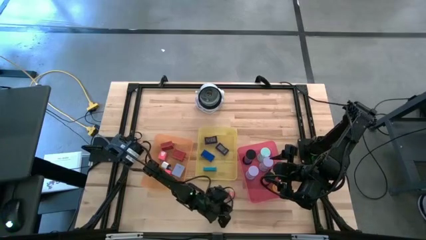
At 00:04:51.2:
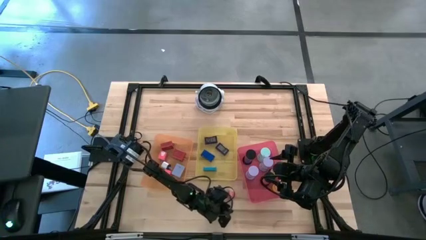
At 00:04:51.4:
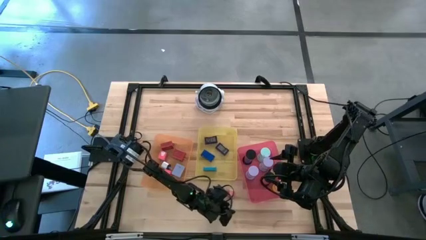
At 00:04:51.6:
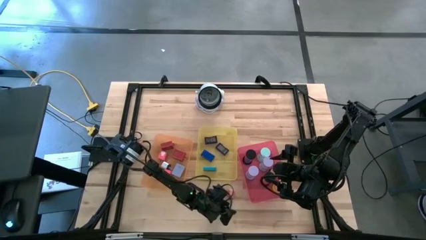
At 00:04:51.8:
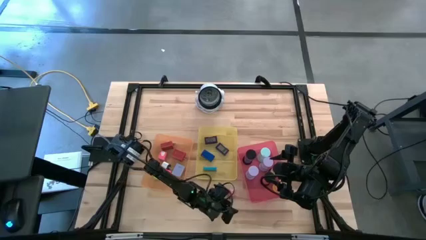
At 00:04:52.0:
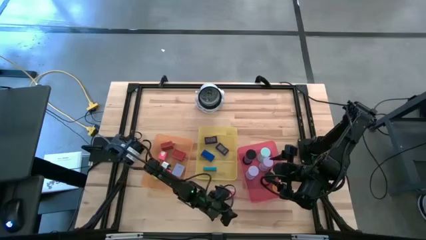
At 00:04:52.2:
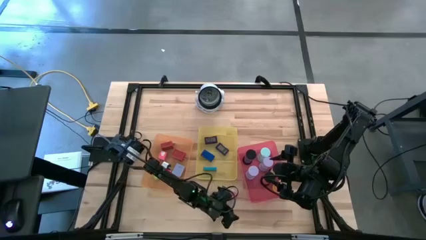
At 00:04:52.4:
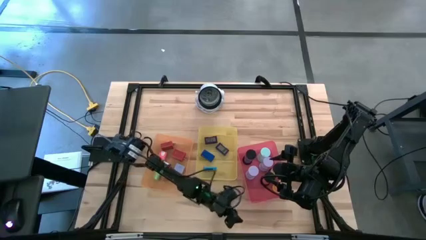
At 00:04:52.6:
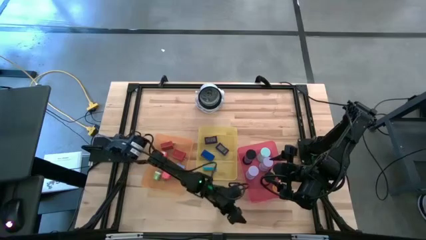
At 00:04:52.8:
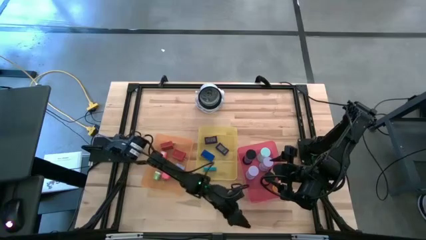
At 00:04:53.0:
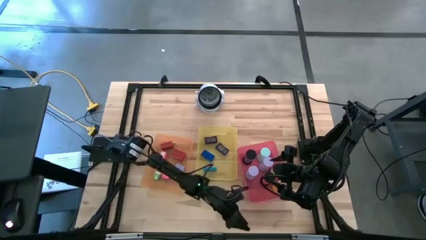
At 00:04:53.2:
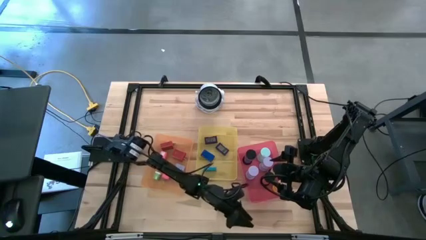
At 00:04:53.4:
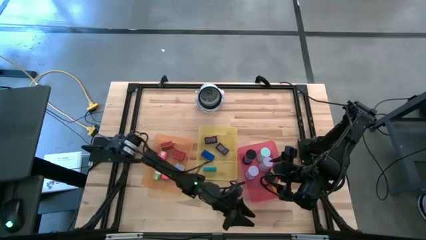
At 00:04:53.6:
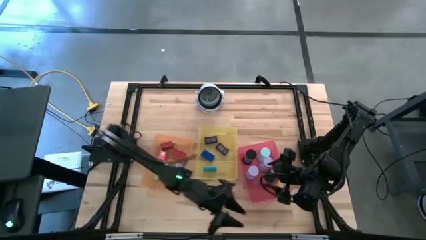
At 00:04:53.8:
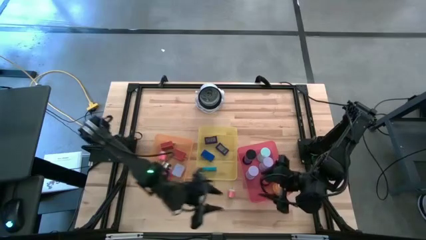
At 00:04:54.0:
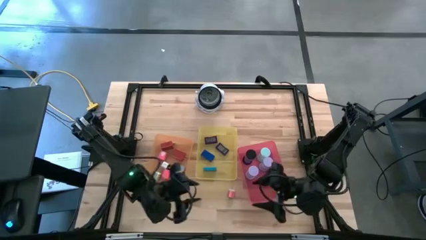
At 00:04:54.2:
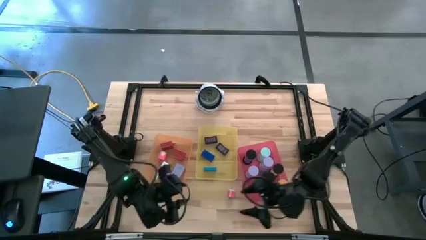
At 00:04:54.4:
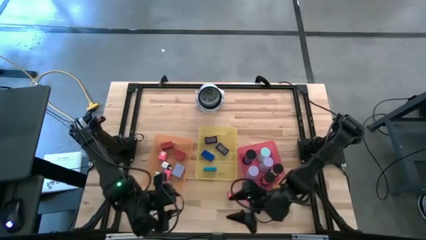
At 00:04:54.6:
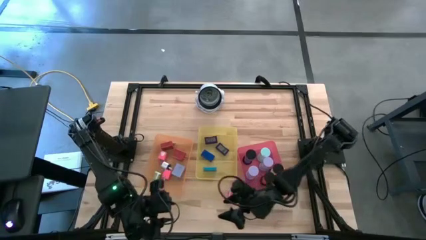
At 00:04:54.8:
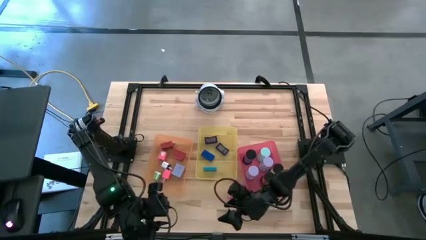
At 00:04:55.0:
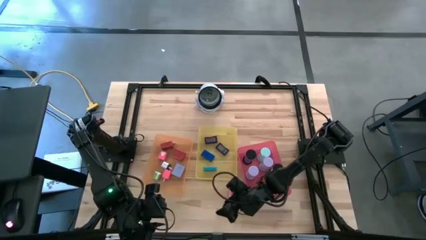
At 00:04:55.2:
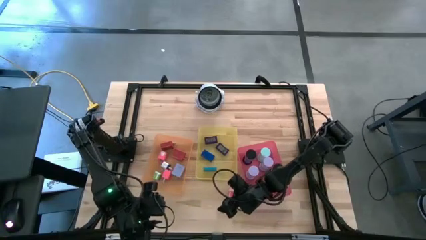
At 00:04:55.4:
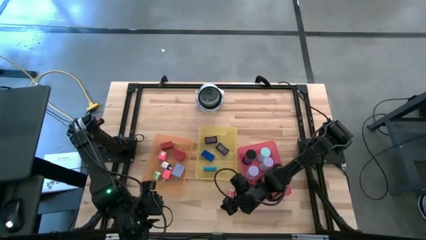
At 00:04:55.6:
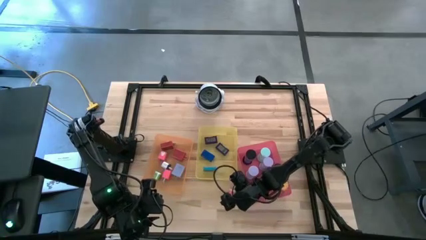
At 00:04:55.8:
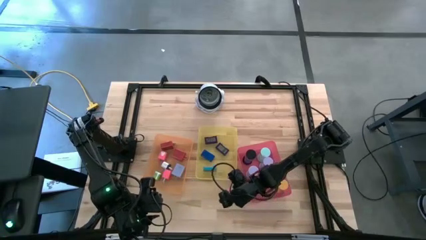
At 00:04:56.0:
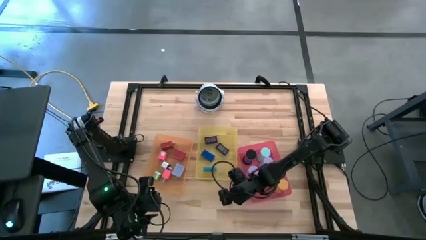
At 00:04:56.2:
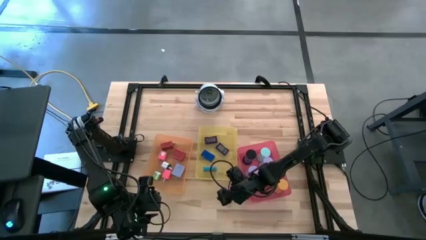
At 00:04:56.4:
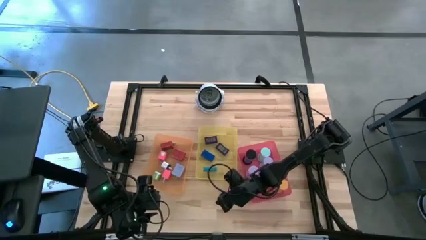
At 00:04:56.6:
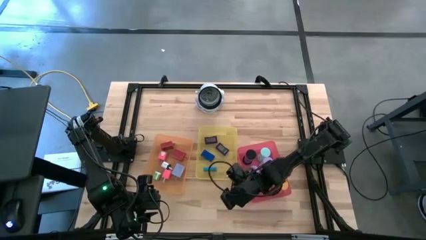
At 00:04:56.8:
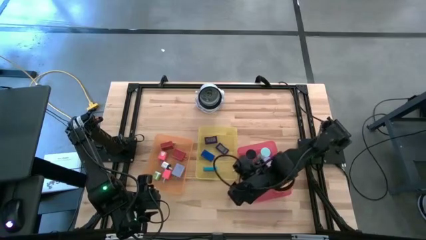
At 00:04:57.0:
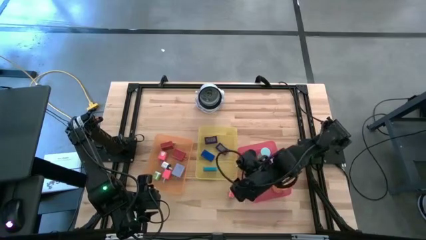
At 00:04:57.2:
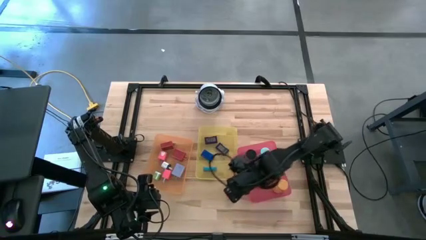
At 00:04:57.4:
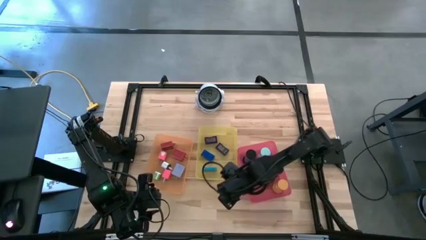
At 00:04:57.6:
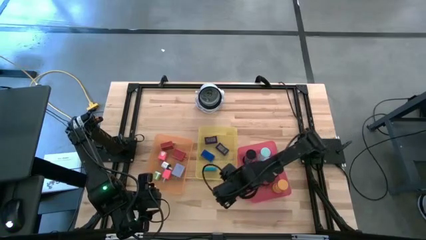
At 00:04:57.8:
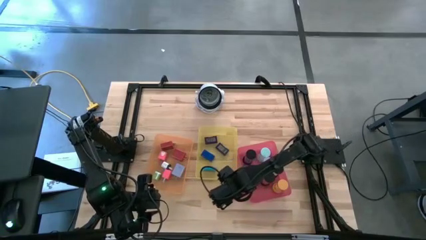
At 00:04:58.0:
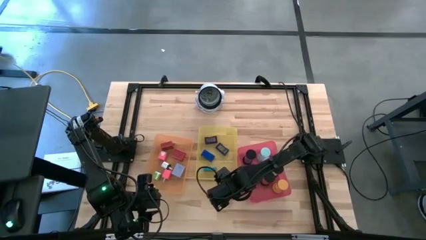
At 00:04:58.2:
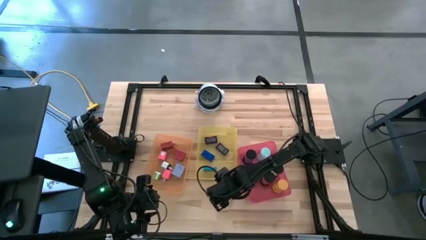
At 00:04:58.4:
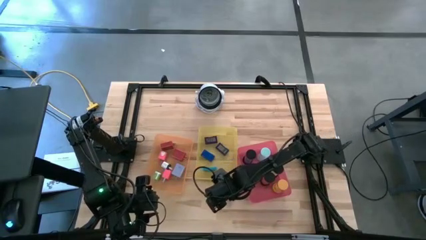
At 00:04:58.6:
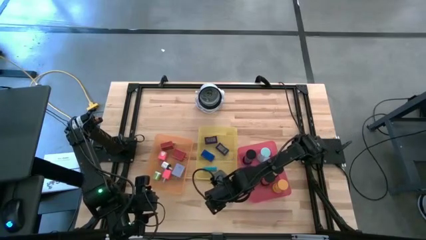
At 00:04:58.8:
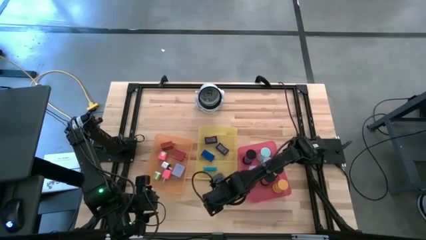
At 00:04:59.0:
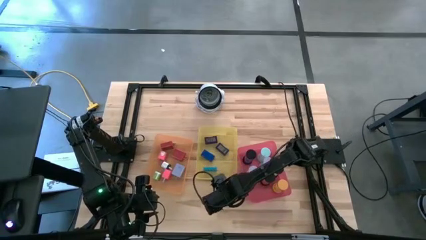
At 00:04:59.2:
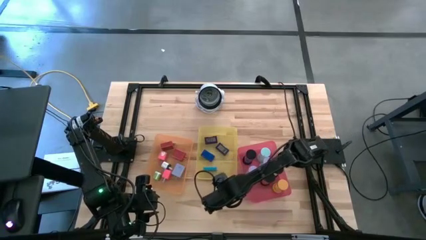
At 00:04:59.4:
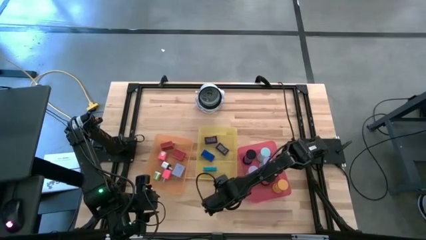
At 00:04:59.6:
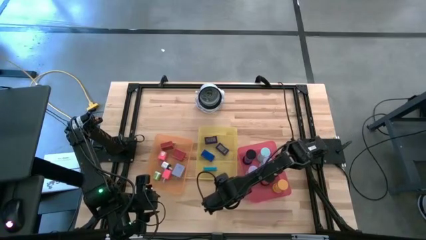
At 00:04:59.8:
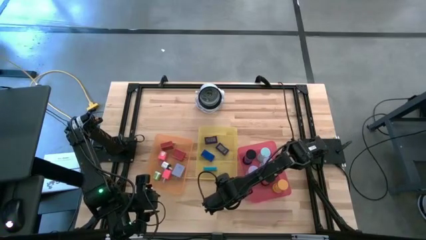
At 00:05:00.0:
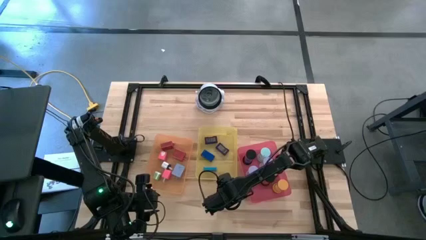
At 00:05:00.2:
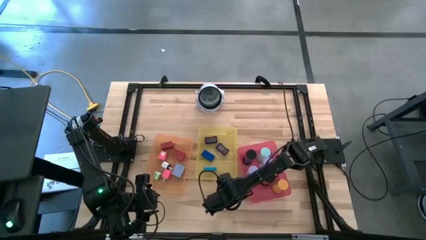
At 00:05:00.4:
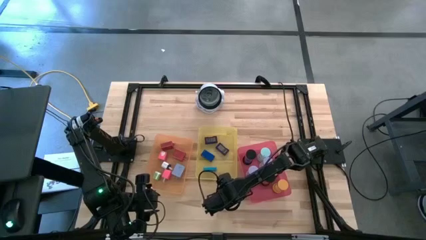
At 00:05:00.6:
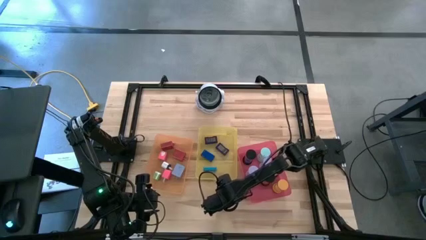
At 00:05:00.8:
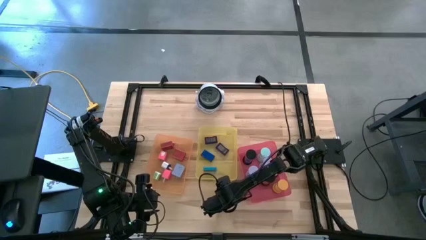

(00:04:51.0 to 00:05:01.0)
Task: Pick & Place Office items
Put the pink charger adaptor into the orange bin
